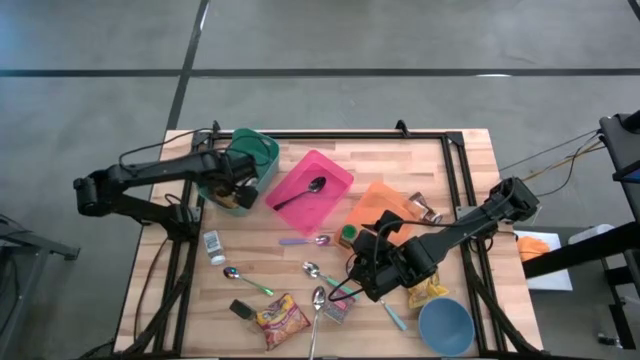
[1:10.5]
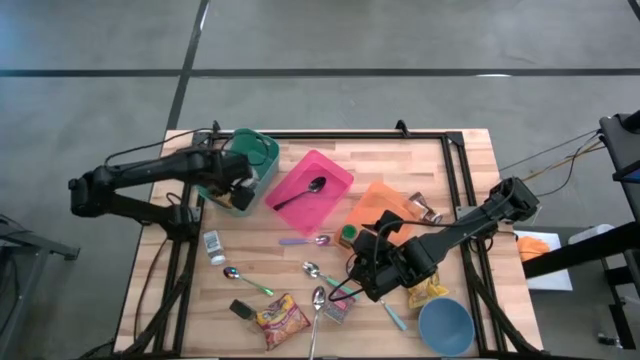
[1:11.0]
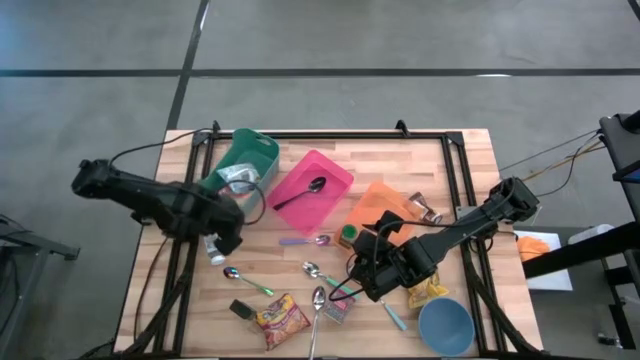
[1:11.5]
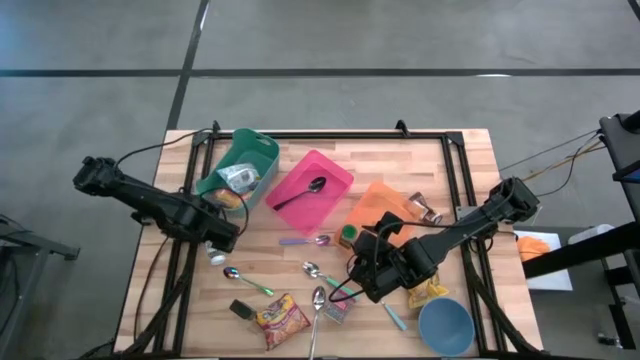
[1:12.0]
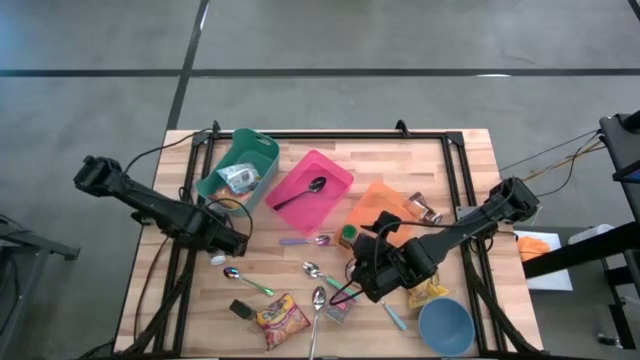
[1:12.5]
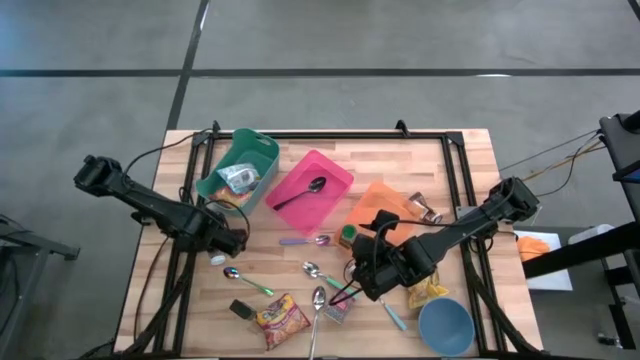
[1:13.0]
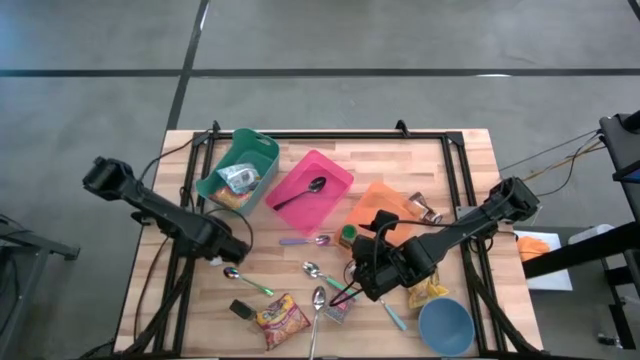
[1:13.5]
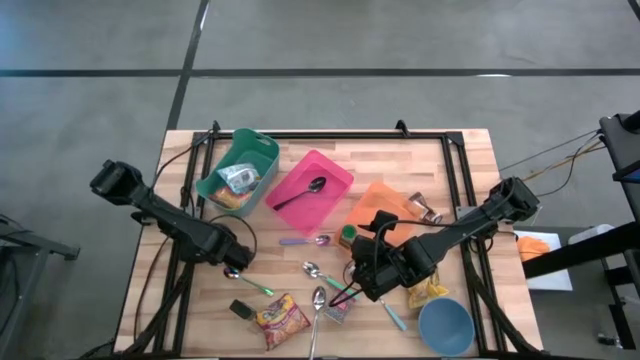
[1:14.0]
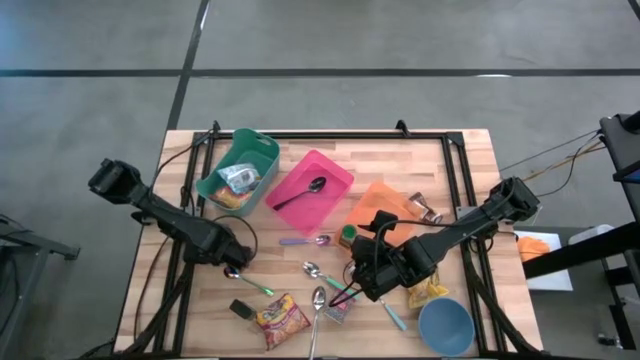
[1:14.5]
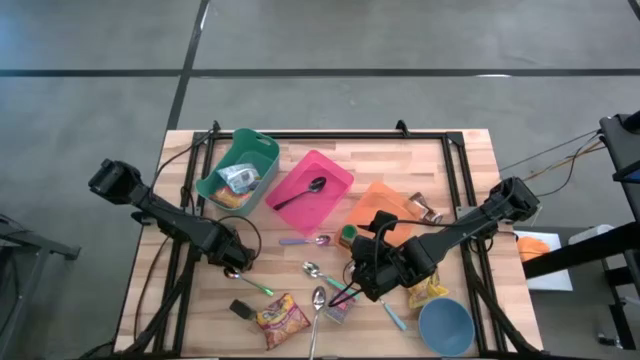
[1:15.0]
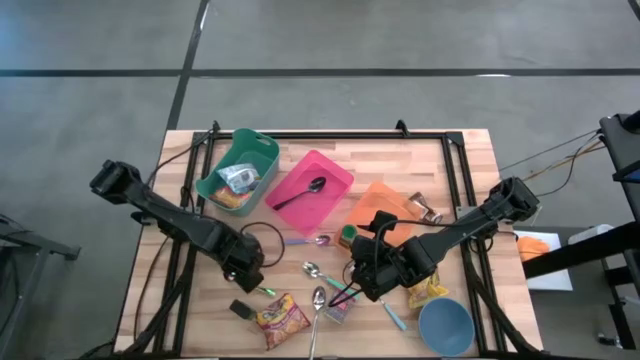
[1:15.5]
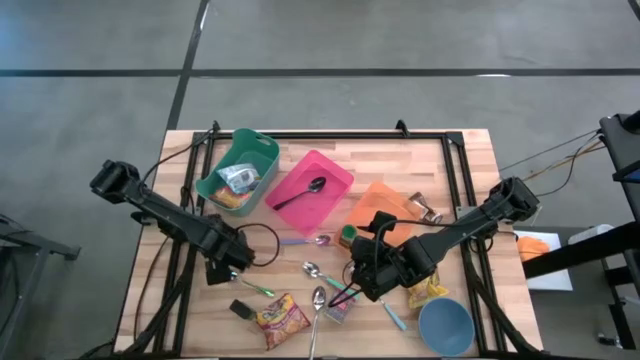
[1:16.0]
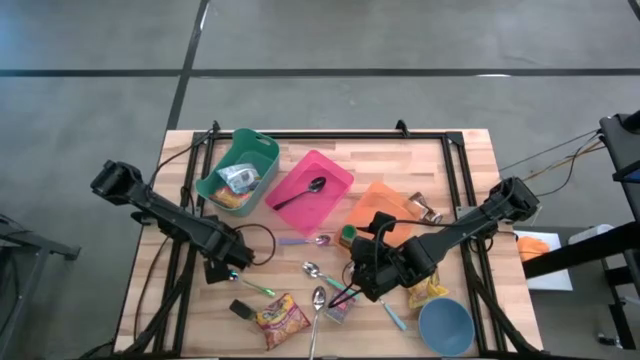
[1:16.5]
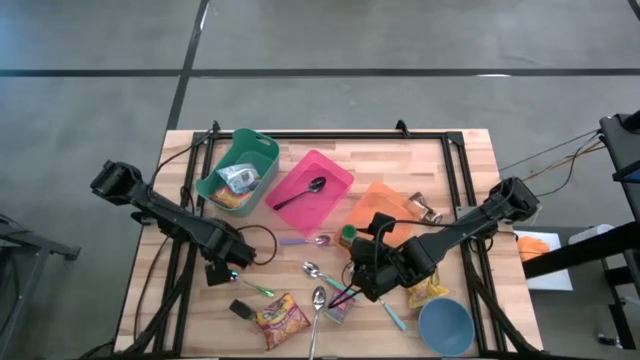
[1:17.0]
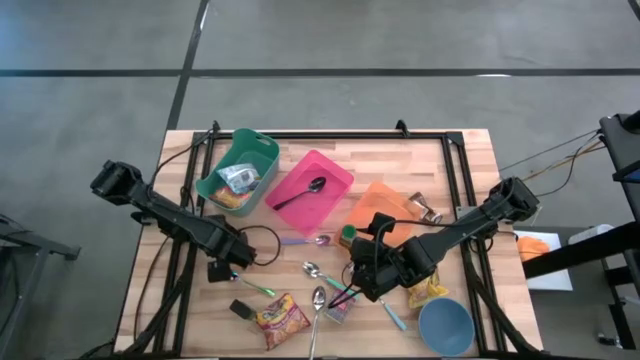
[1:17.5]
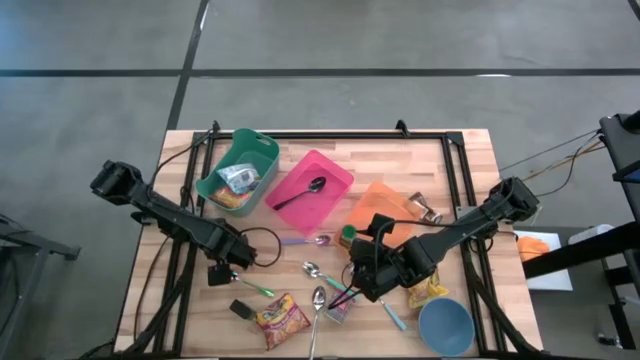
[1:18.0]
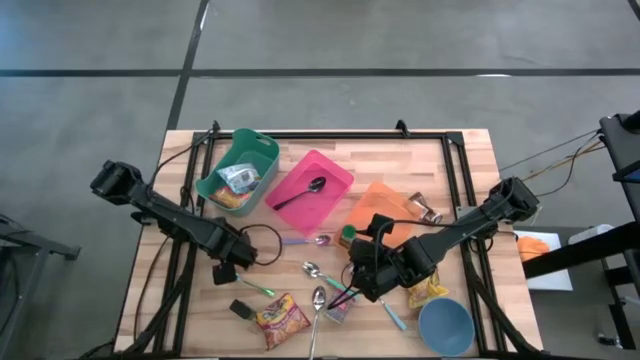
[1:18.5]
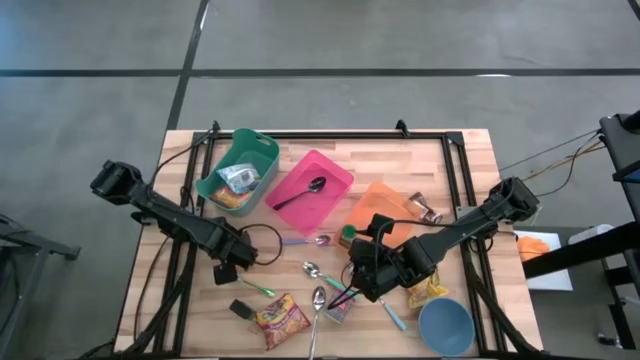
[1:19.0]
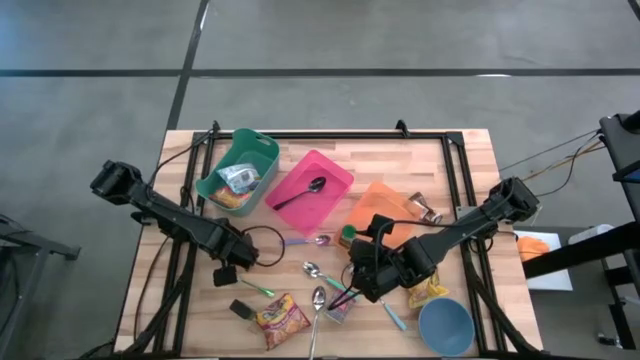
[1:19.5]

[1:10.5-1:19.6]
Put the white seasoning bottle into the orange bin

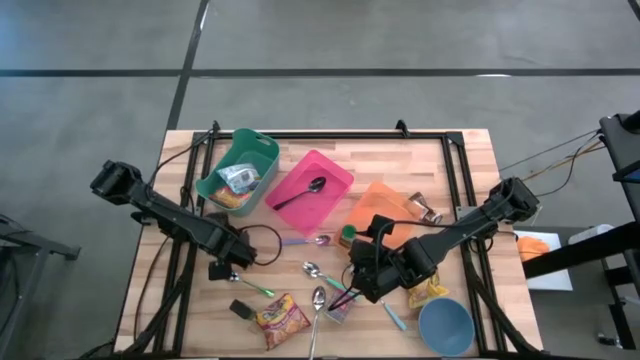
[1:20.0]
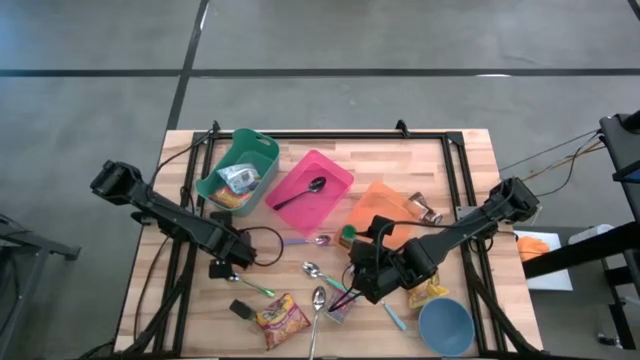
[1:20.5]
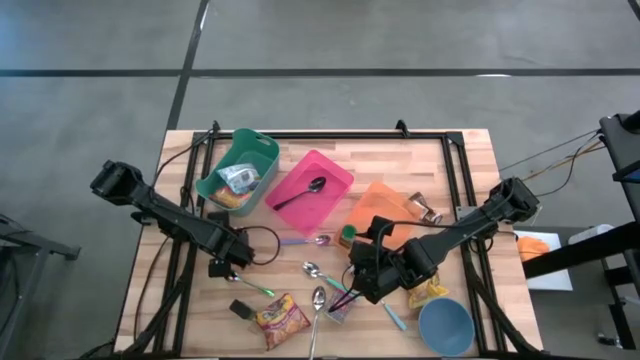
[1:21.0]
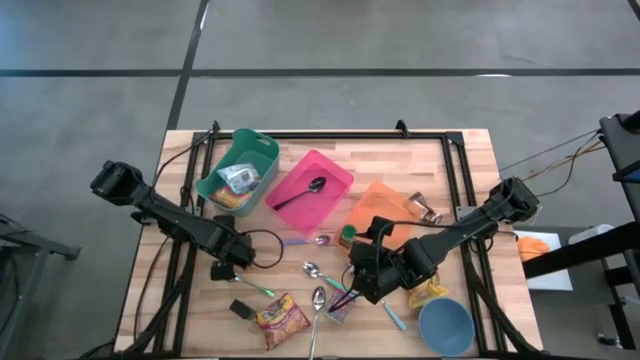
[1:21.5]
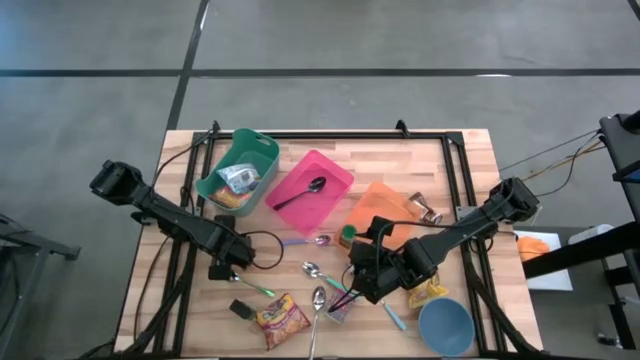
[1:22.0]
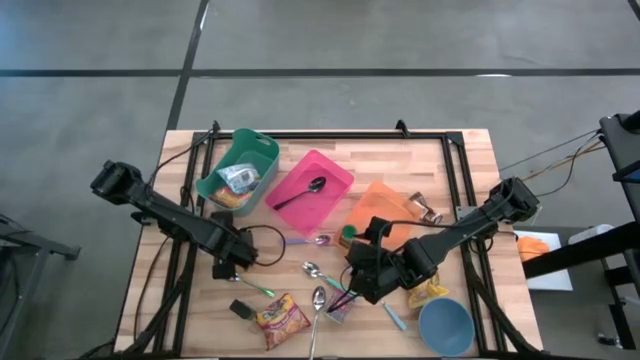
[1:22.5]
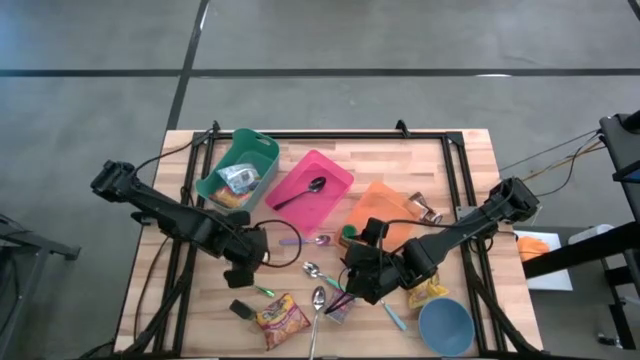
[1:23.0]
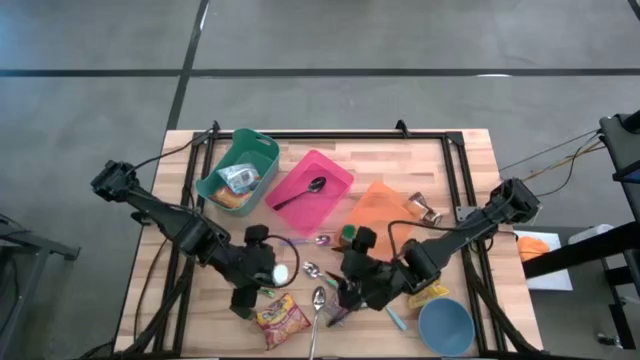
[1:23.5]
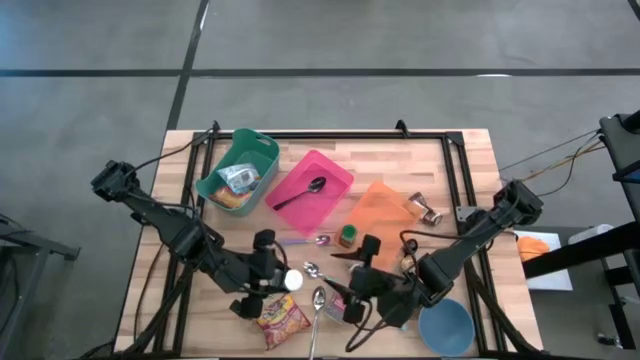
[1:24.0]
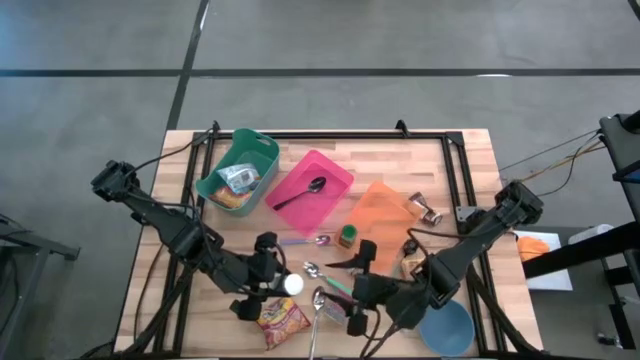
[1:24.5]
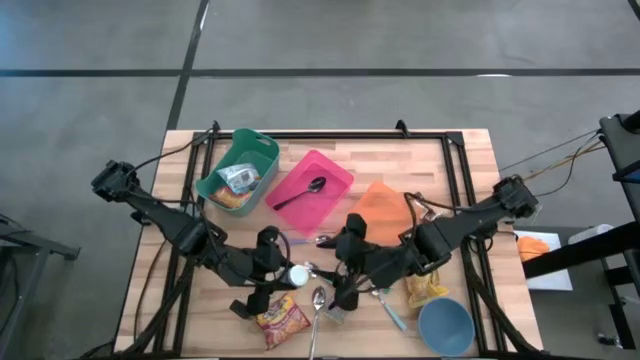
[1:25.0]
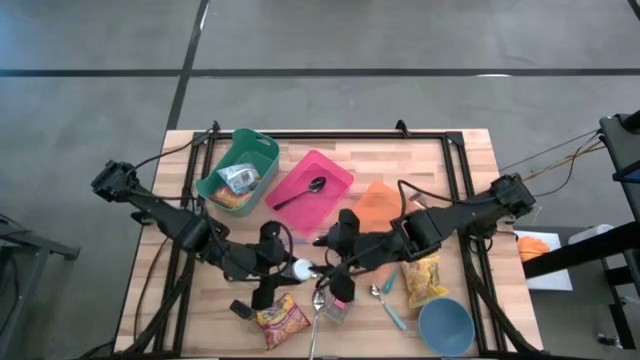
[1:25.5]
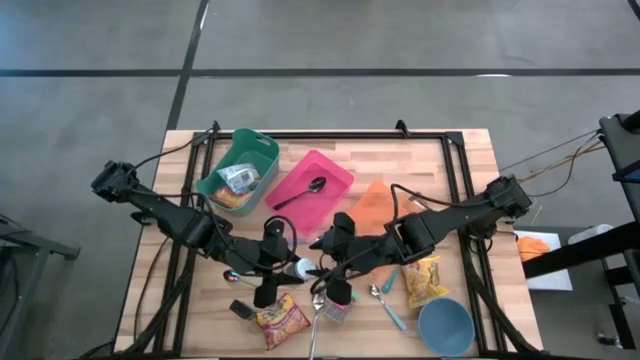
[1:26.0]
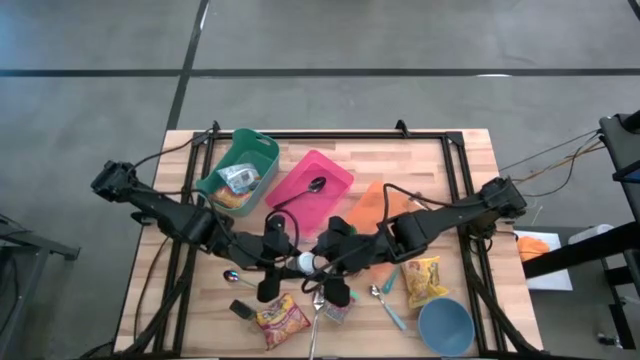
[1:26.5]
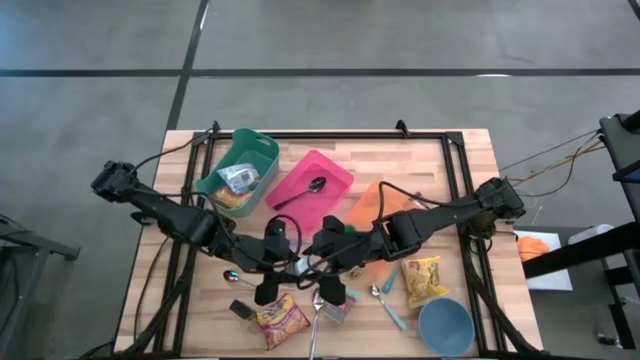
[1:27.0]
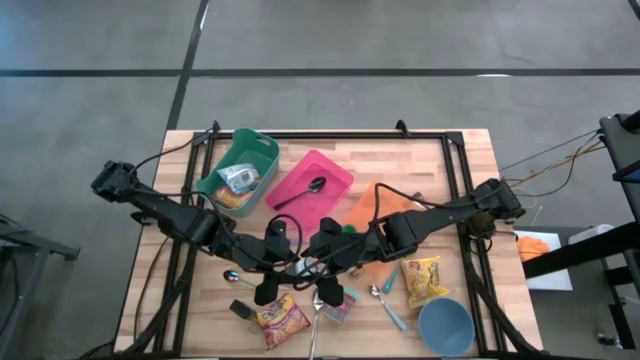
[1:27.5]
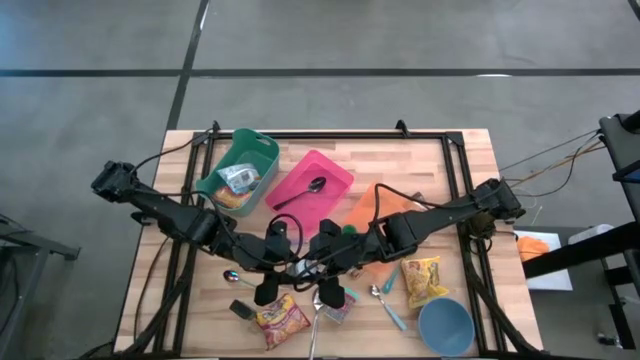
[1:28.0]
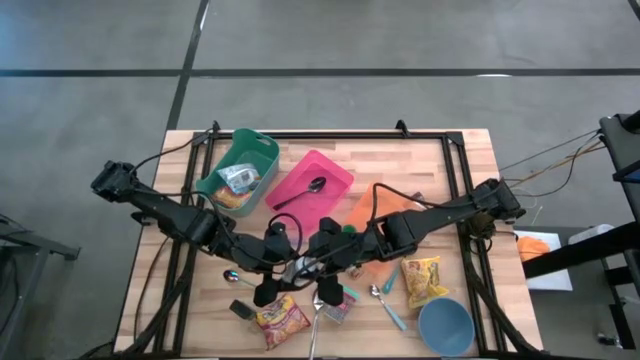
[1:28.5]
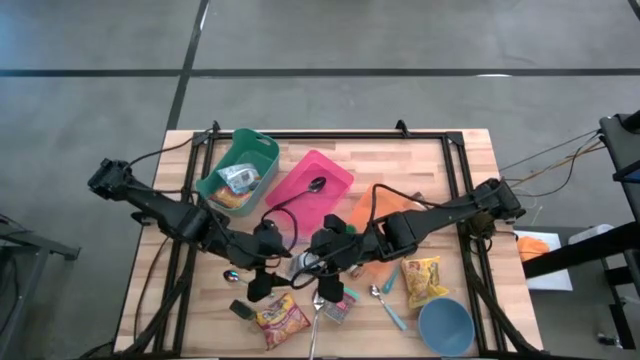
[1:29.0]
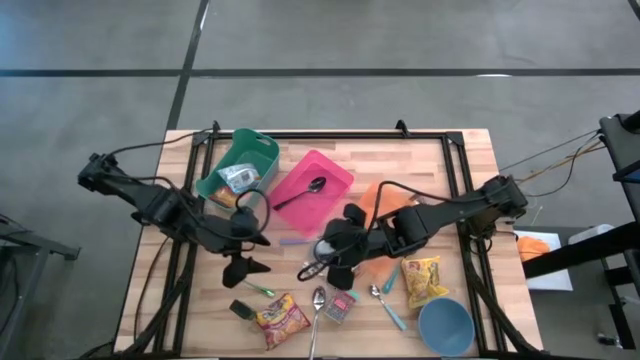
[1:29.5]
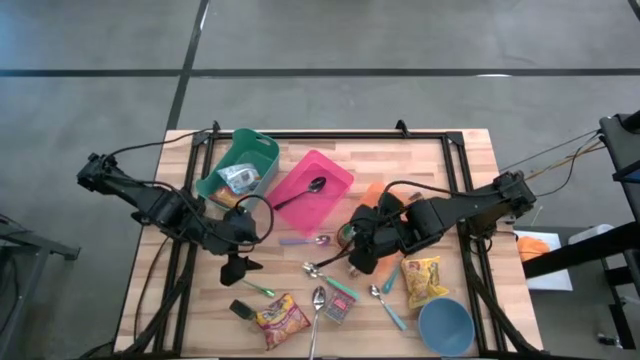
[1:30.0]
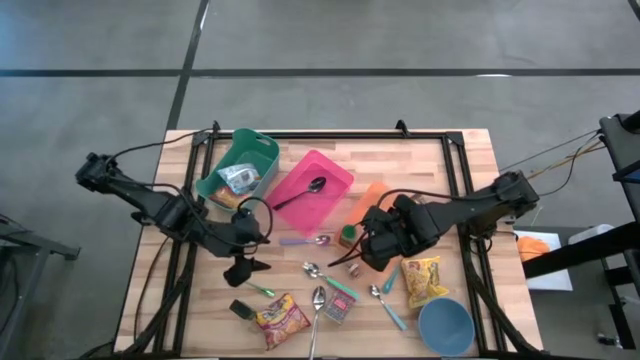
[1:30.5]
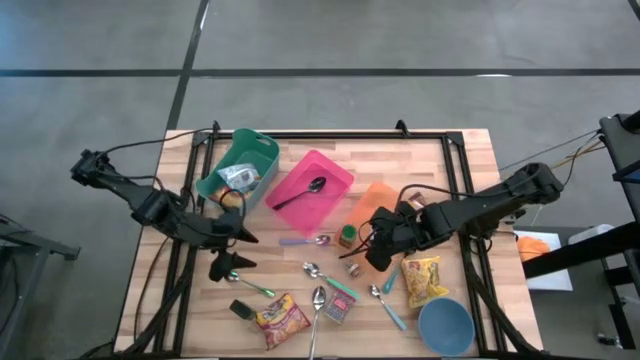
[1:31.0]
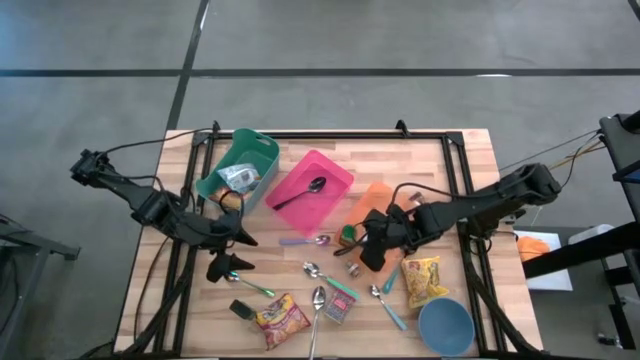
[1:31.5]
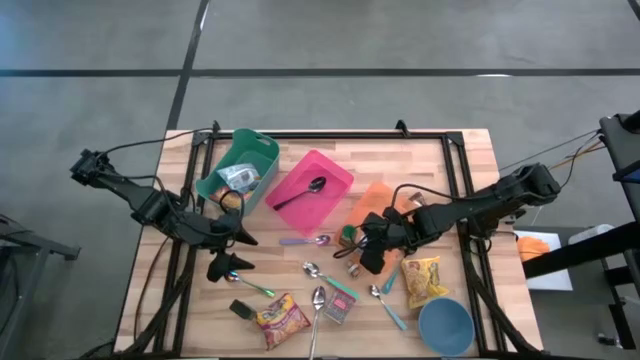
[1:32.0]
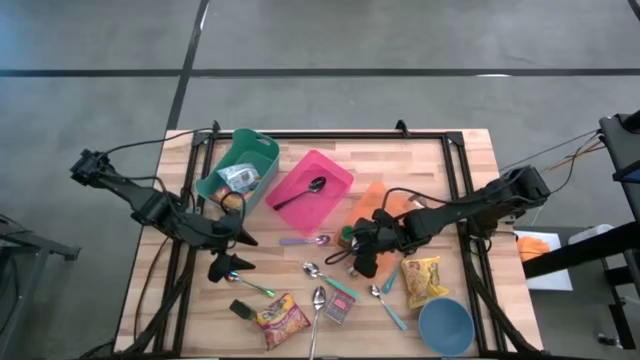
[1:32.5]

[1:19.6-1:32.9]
Put the white seasoning bottle into the orange bin

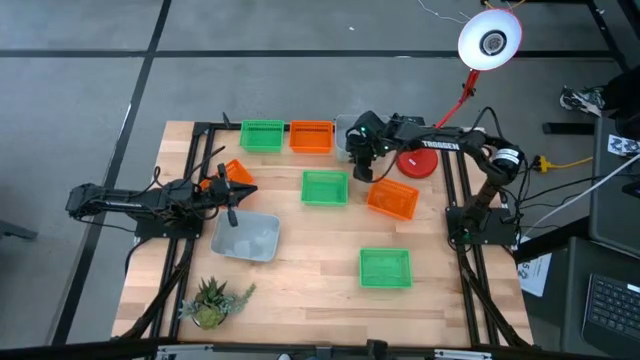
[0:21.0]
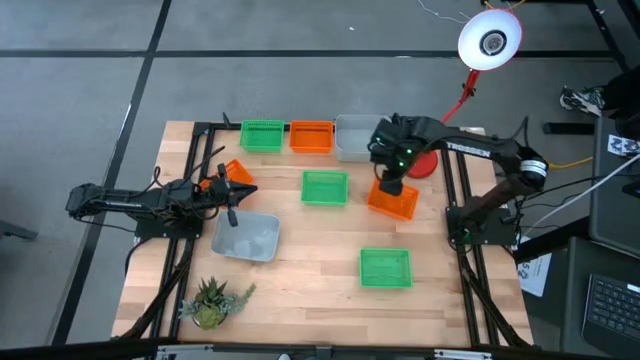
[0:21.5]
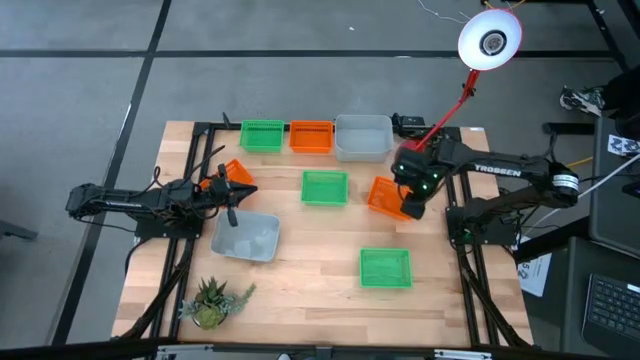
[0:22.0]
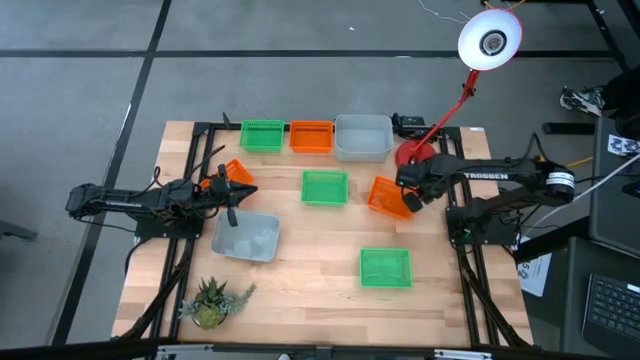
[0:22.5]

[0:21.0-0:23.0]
Adjust the bottom right orange bin
